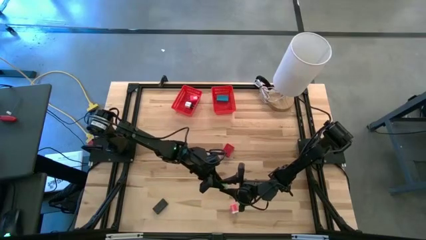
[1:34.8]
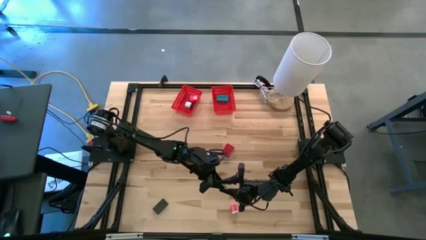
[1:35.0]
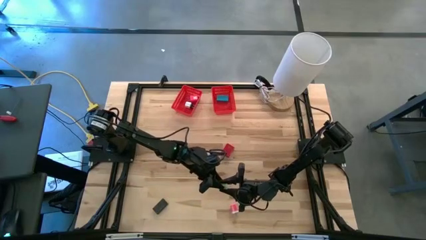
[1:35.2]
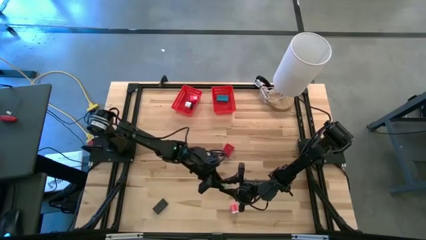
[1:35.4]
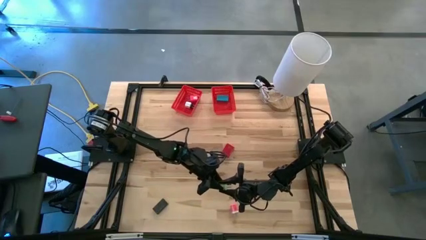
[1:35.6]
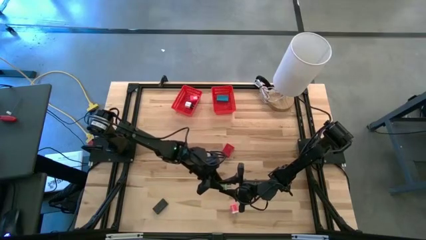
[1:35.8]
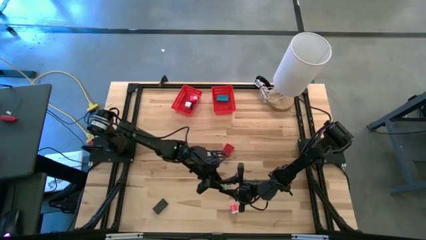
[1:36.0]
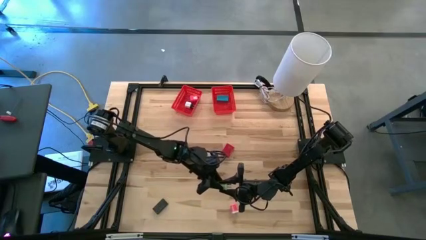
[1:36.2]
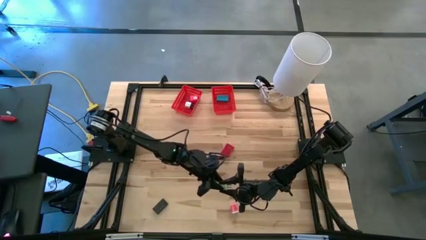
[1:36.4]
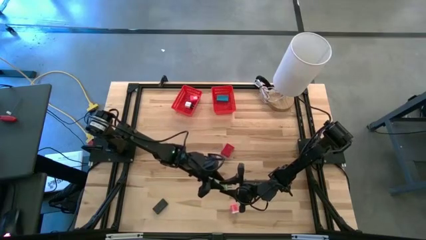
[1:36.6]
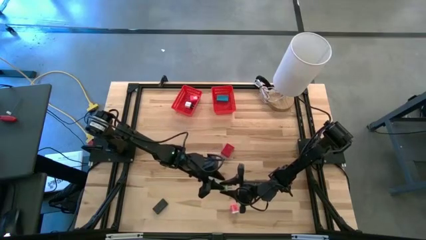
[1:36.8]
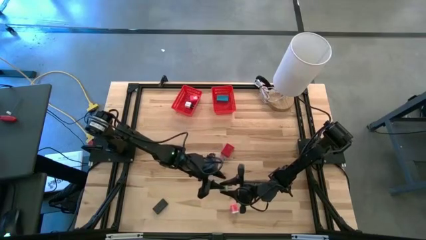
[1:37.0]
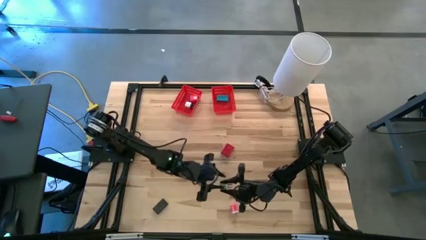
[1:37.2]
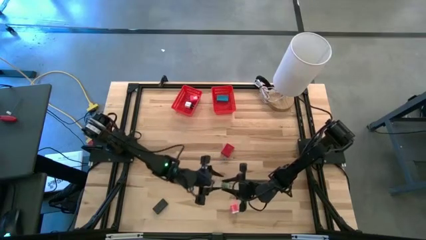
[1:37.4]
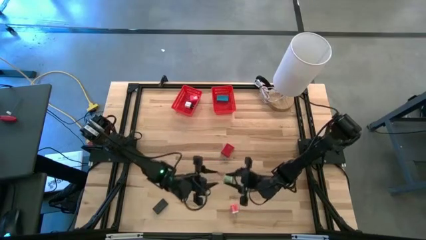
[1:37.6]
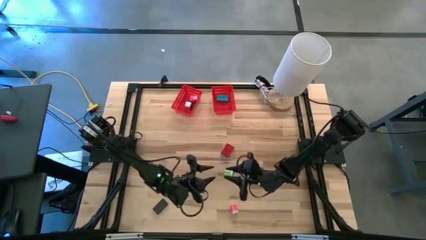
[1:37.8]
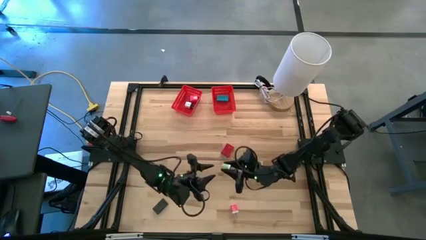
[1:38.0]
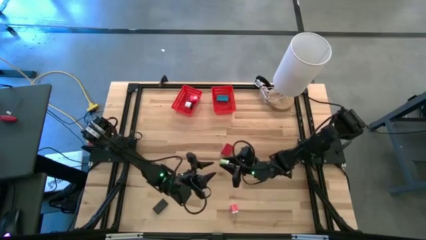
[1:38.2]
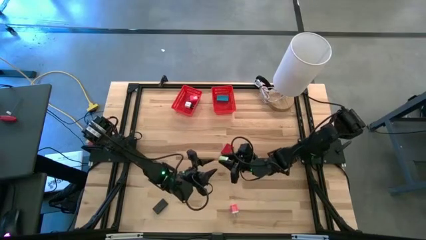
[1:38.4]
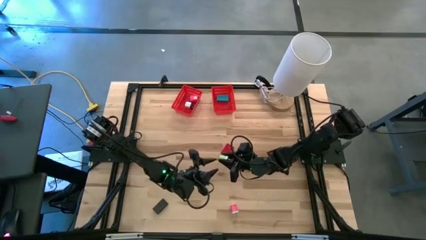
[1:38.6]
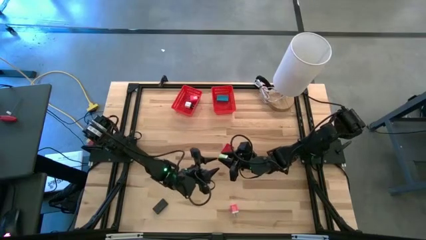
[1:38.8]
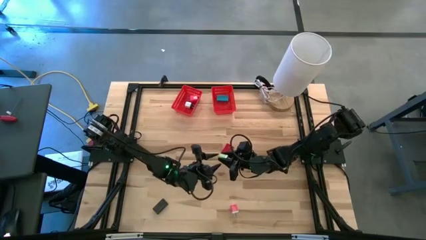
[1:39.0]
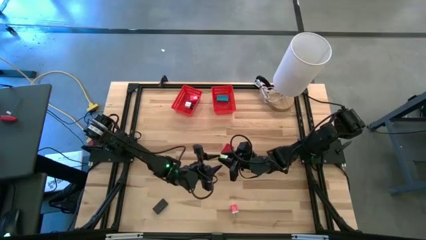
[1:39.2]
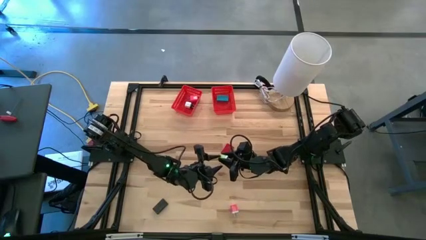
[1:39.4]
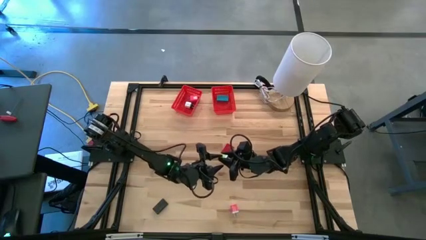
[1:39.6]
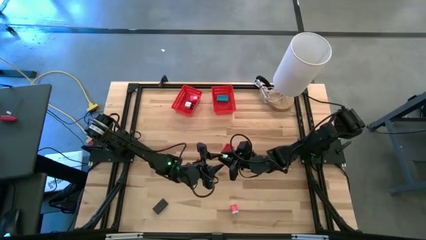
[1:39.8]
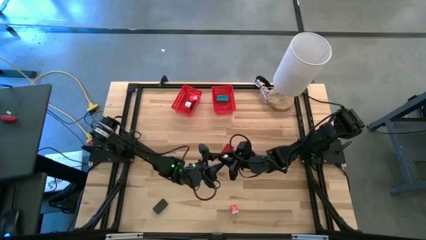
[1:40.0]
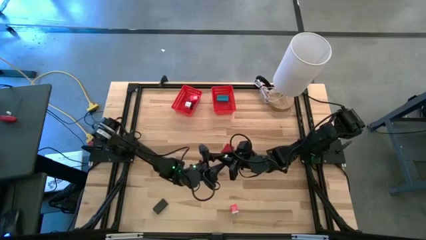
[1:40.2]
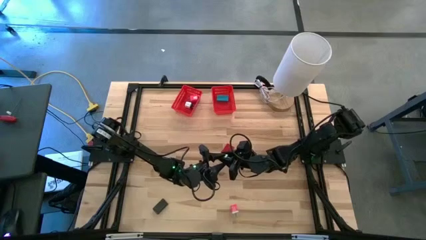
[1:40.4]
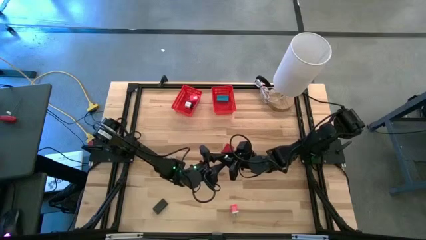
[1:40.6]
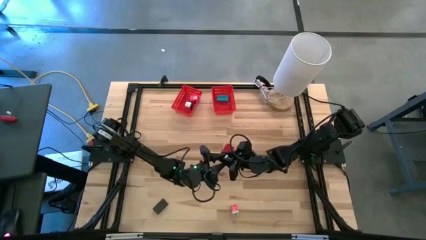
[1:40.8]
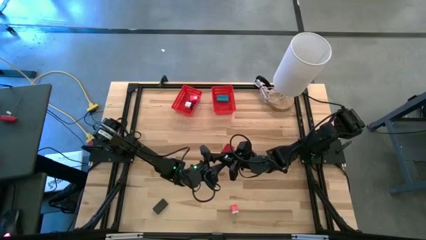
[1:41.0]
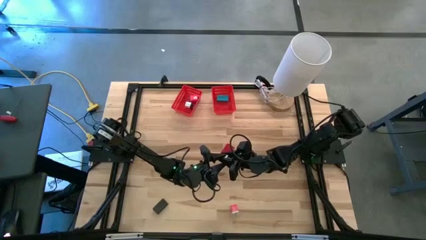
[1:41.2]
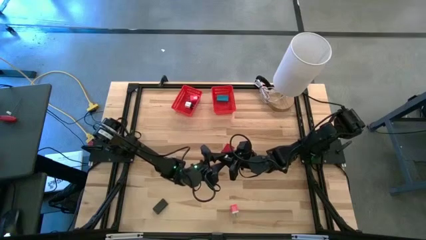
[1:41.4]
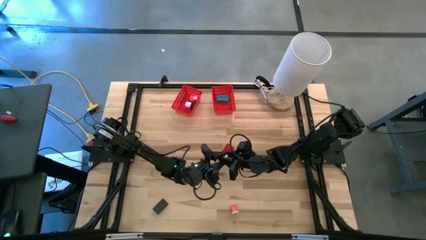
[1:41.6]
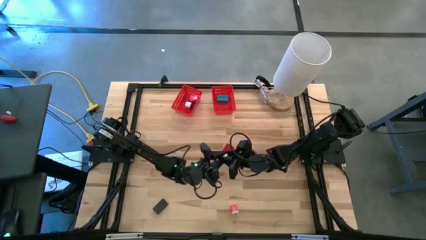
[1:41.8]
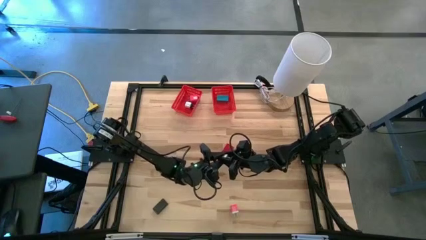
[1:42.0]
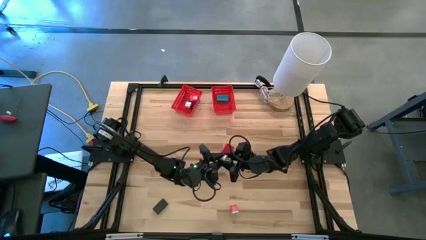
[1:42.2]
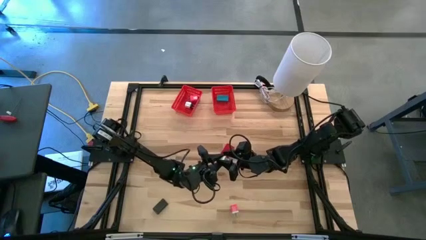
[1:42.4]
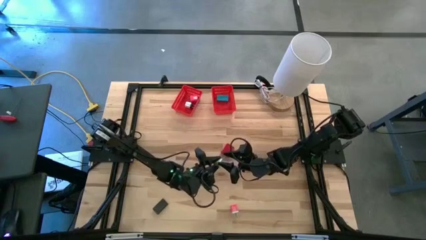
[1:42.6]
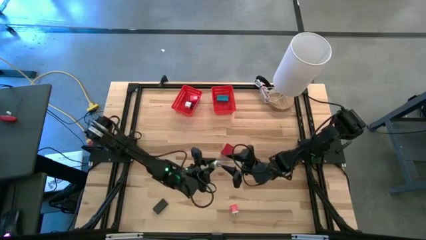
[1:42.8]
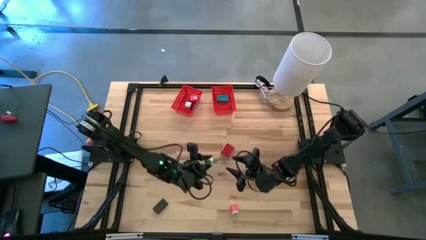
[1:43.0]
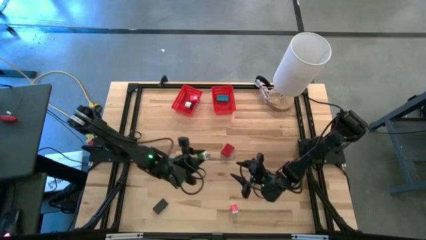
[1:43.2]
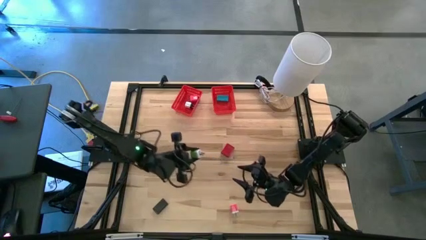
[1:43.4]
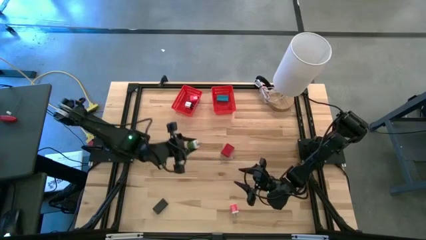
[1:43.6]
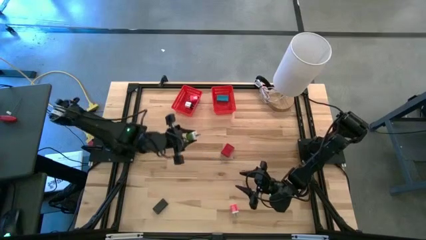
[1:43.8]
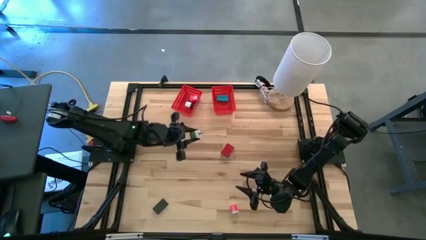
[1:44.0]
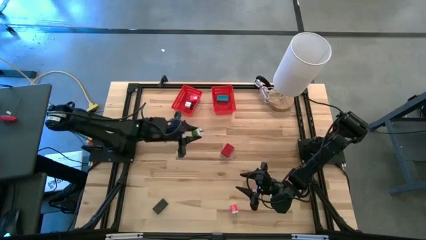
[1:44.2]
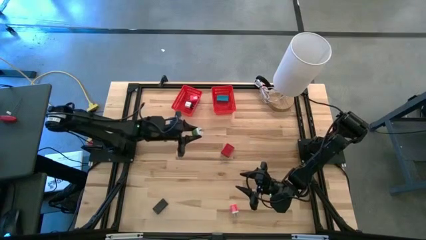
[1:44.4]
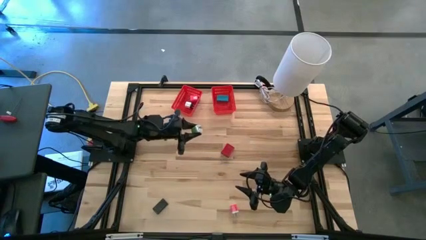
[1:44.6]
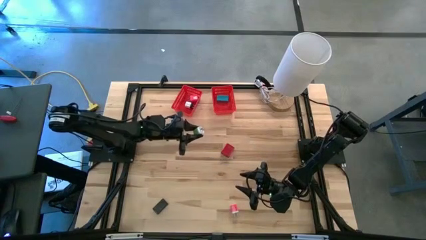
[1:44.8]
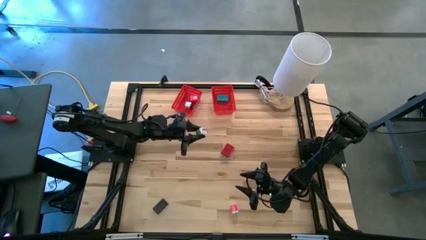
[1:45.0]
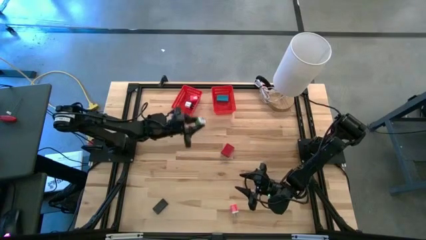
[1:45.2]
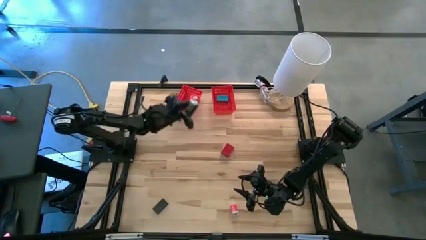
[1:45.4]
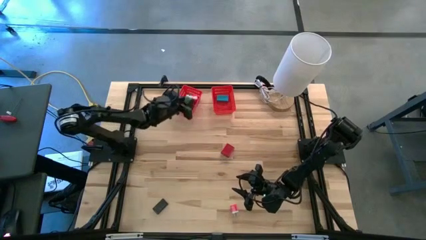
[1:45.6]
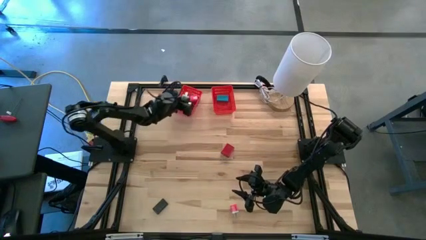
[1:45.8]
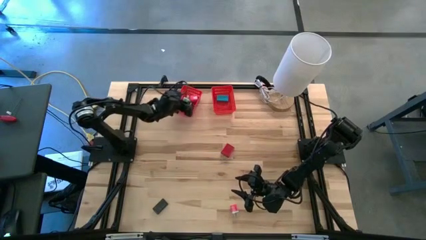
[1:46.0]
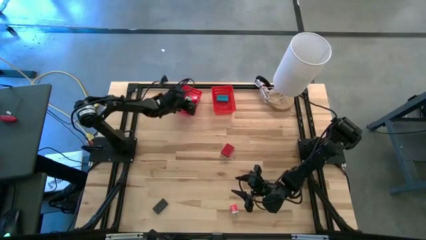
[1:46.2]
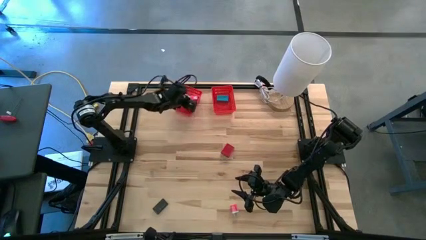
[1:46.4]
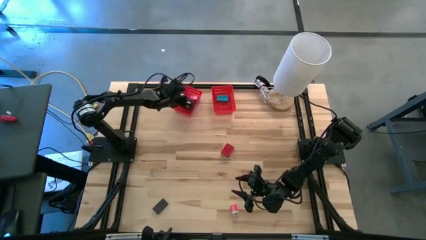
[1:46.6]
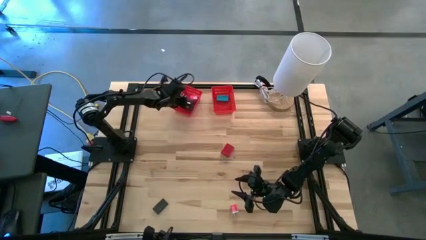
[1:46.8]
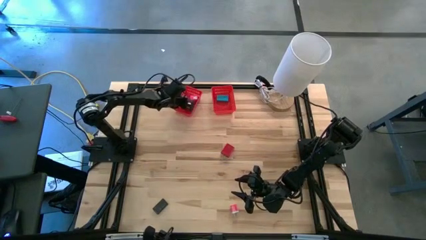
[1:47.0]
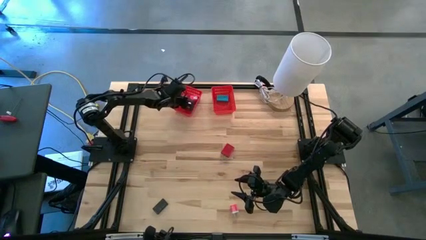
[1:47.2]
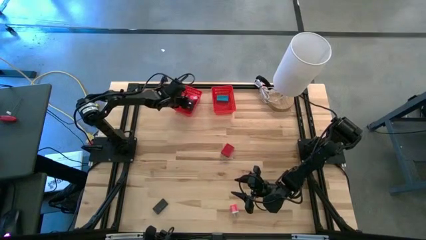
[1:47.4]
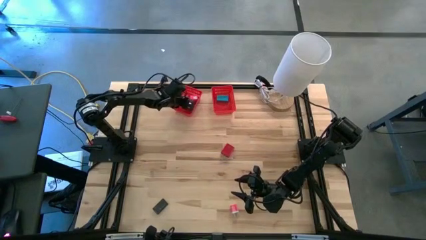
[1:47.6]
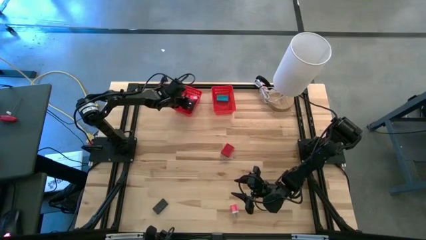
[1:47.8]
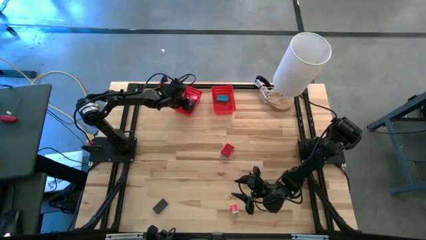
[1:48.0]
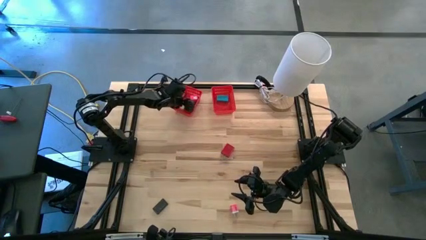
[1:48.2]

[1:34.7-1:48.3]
Task: Pick & Place Office items
Put the green charger adapter into the left red bin
